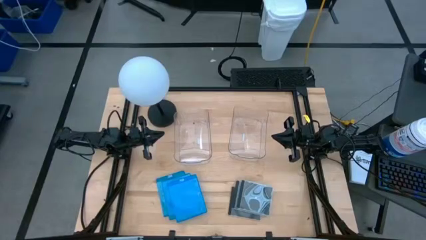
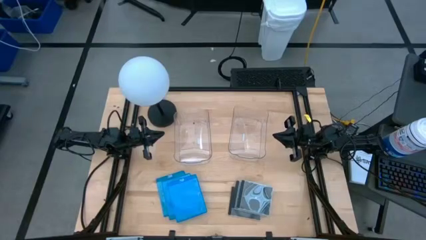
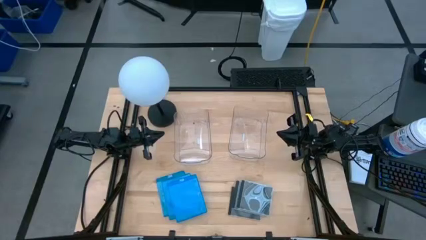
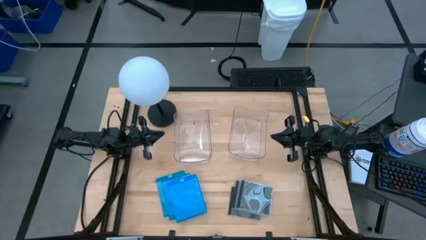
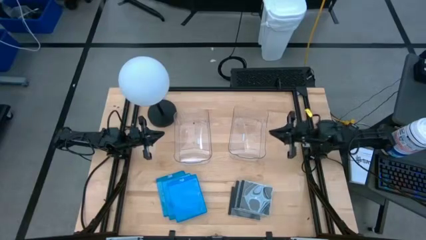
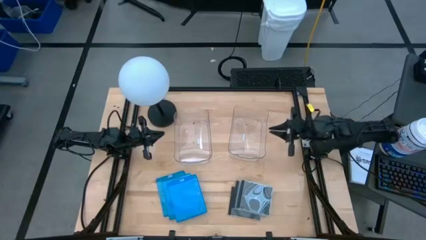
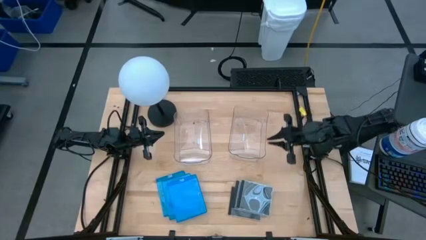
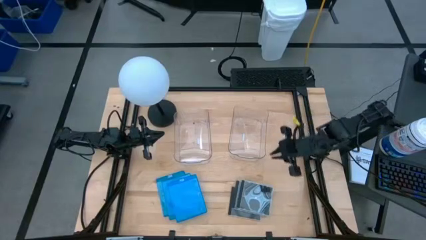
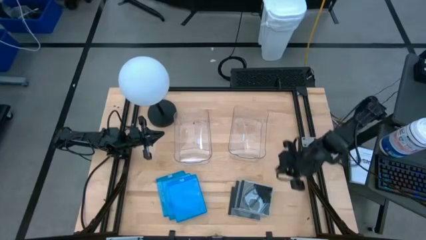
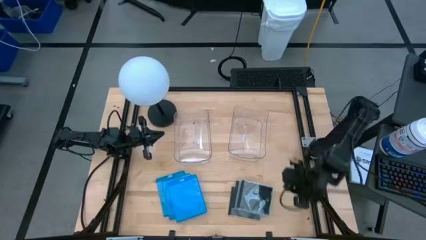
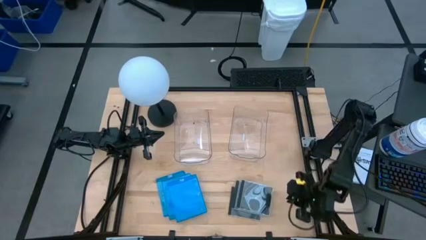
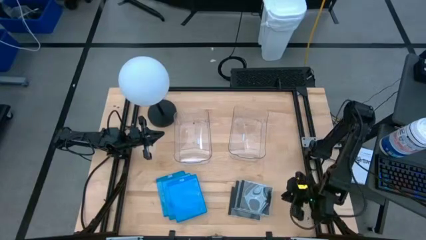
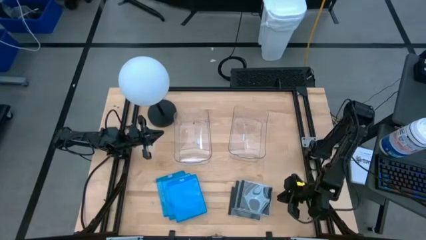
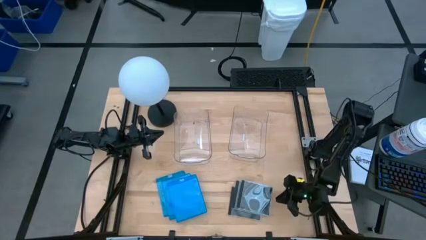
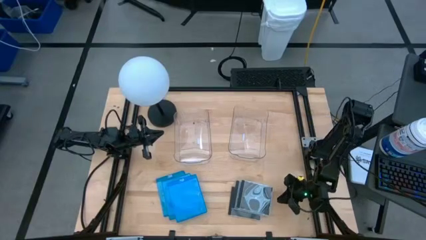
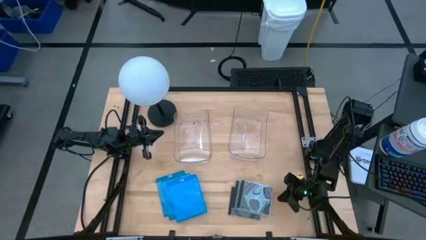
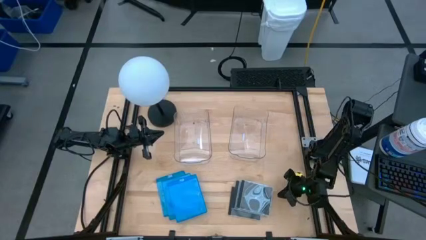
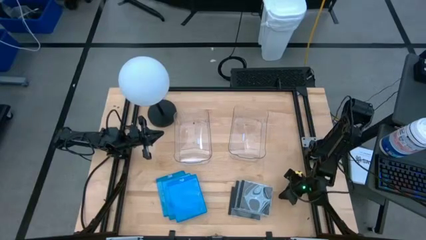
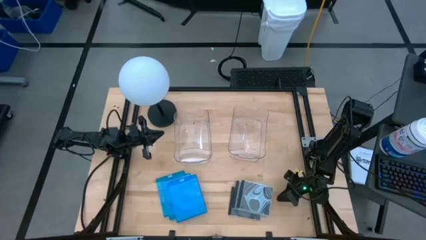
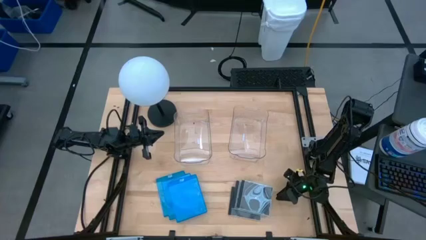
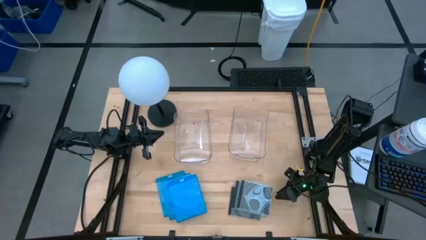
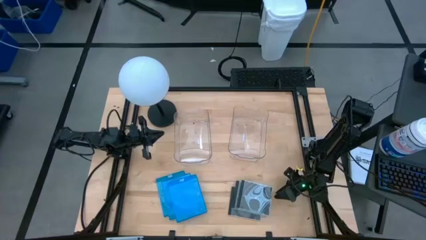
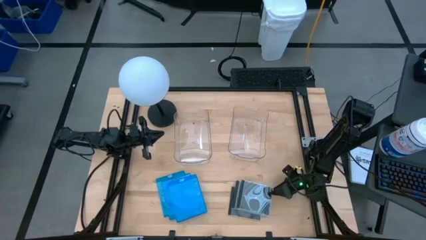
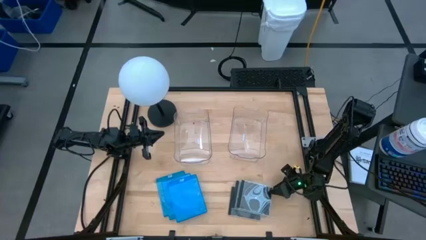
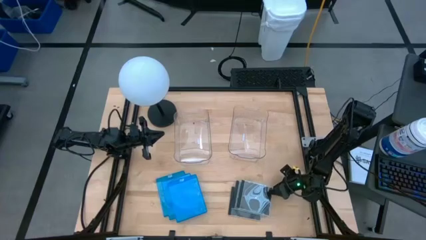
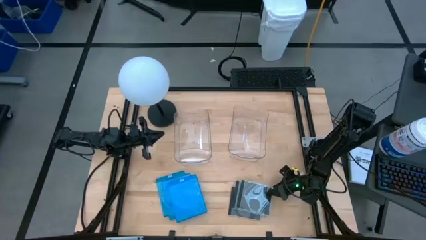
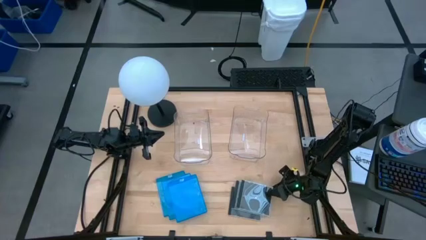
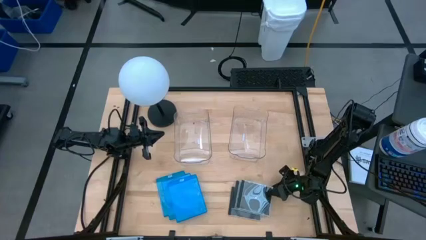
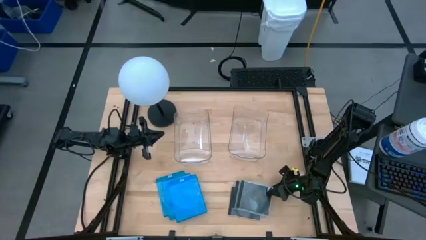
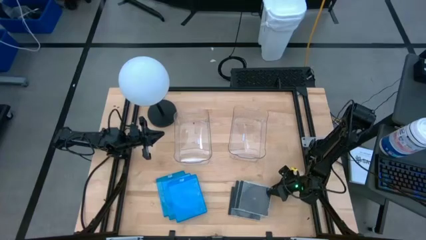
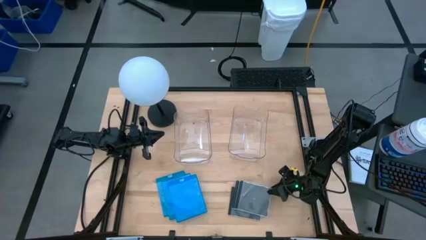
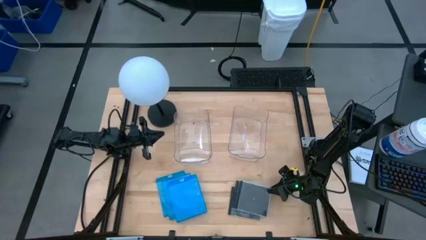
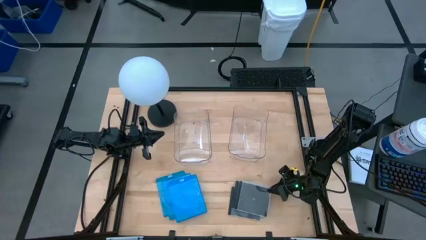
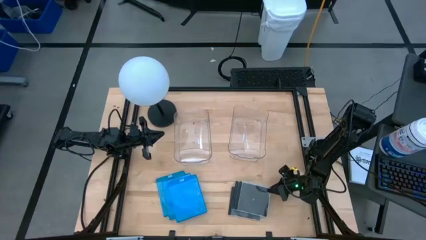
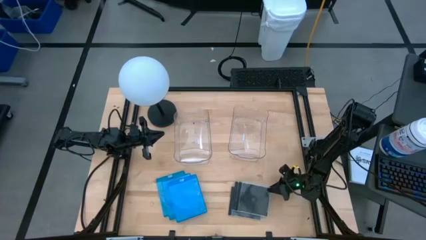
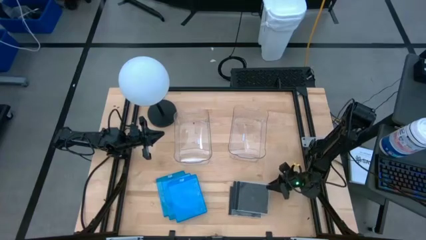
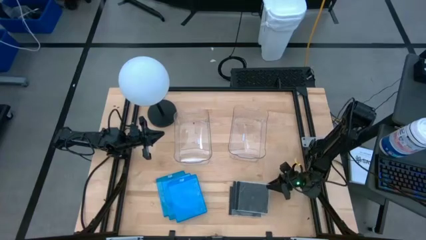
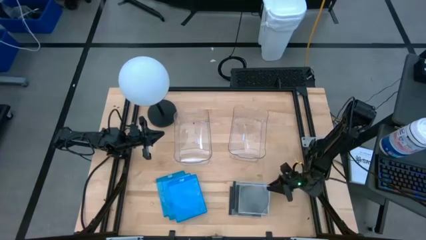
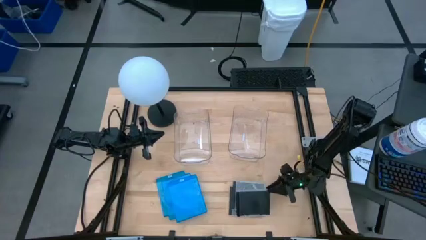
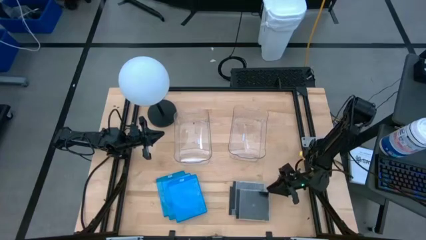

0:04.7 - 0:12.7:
Task: Pick & place jewel cases by type
Put the black CD case into the right transparent bin

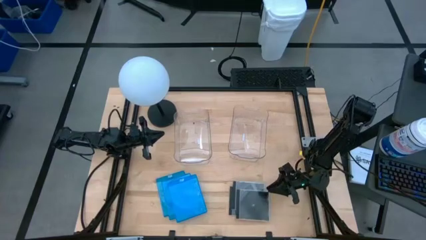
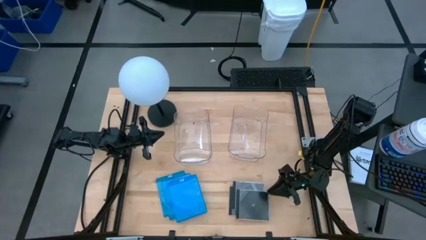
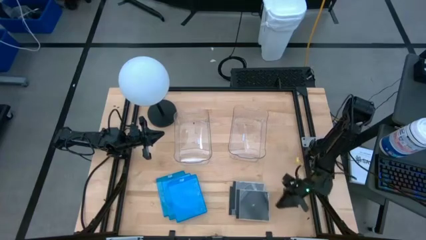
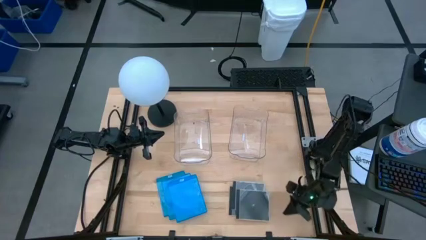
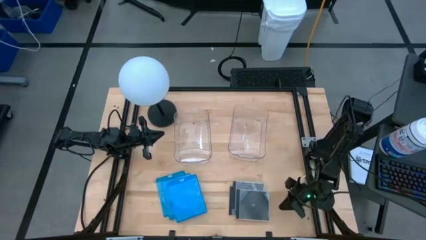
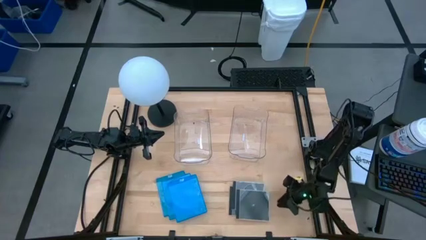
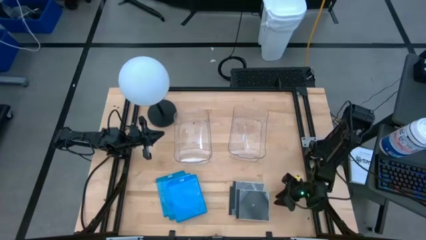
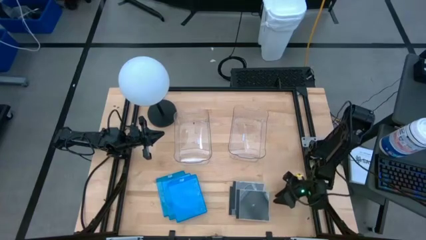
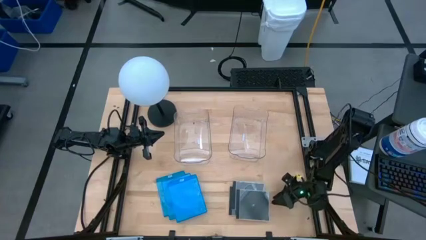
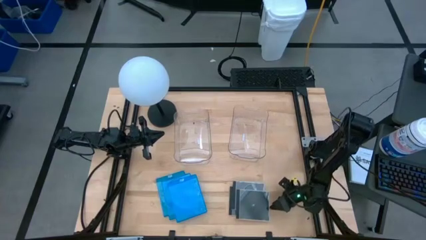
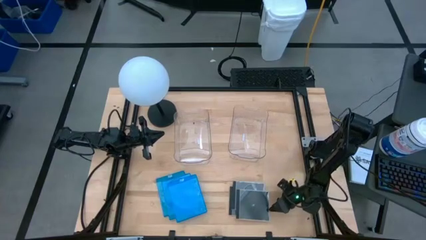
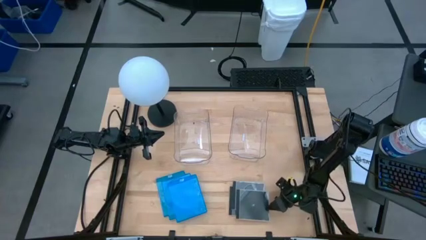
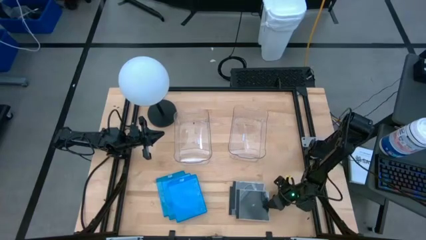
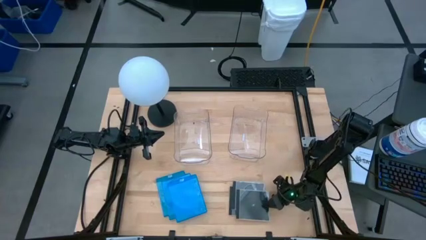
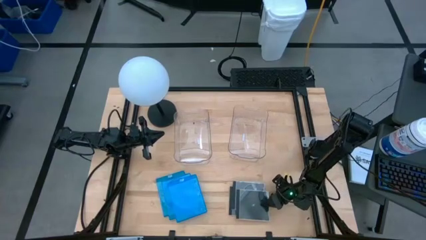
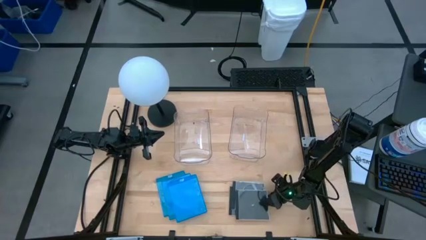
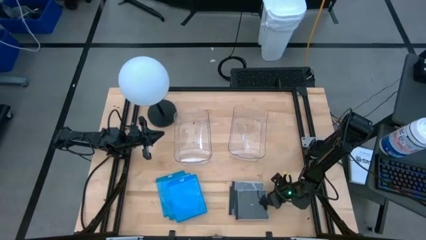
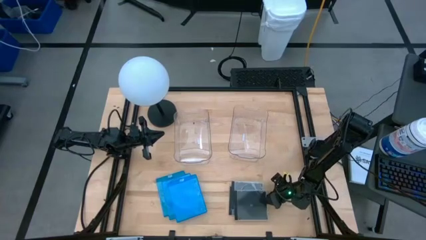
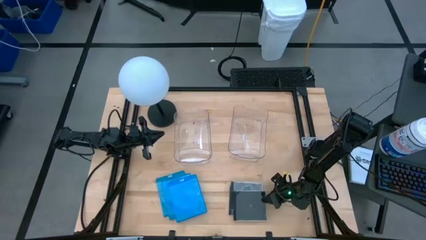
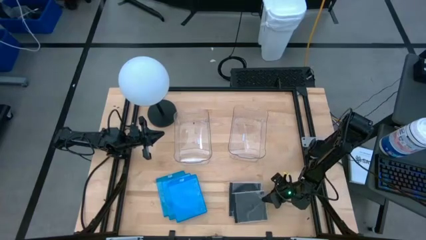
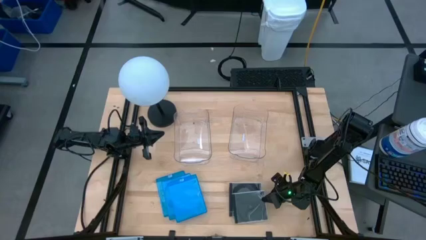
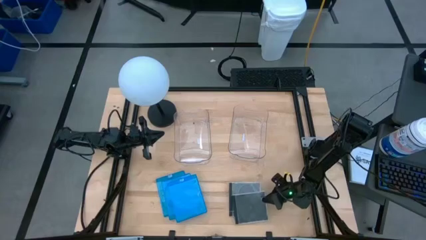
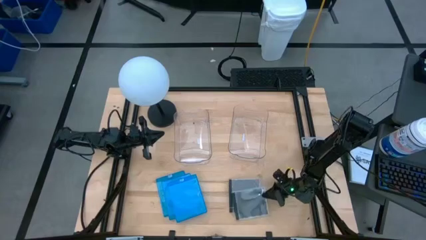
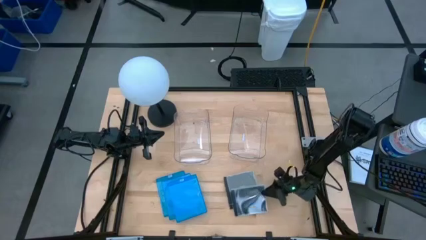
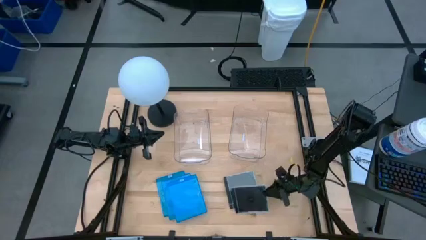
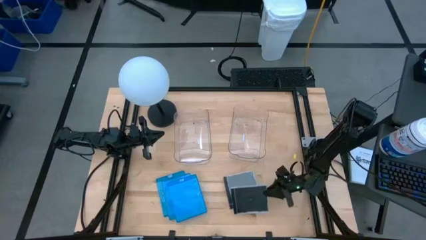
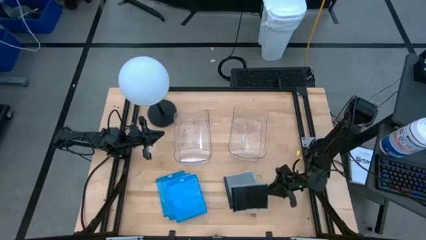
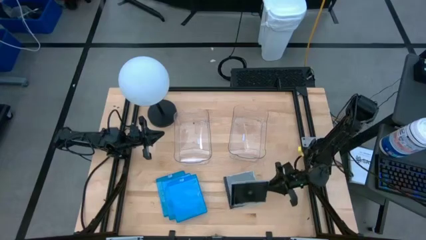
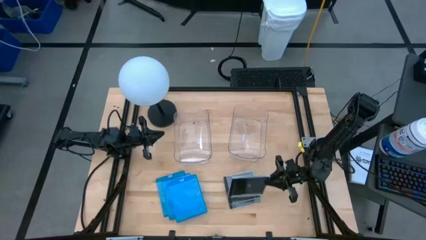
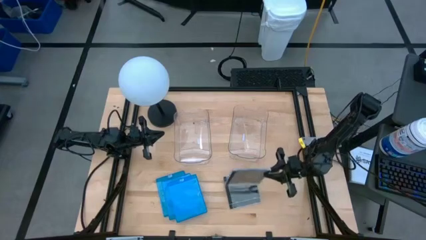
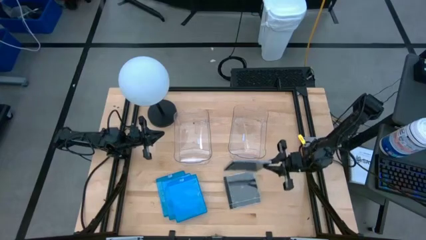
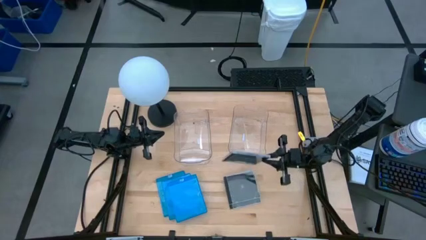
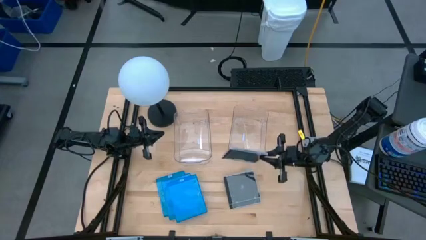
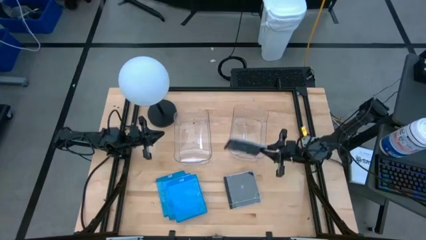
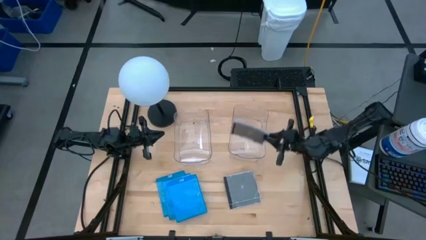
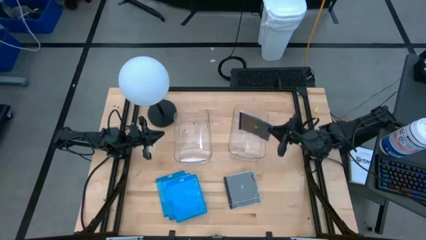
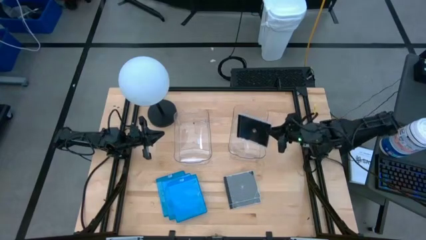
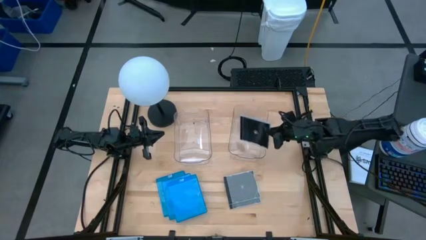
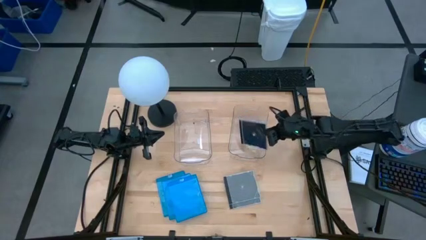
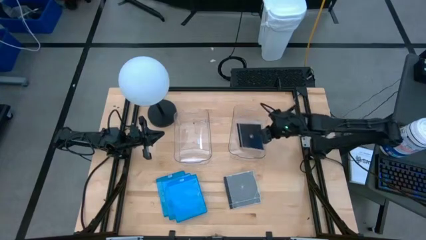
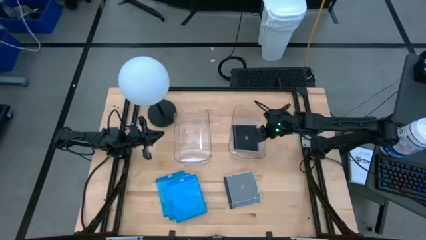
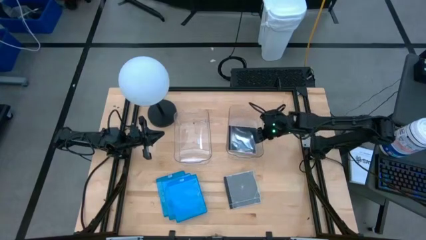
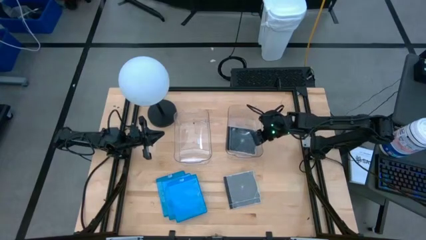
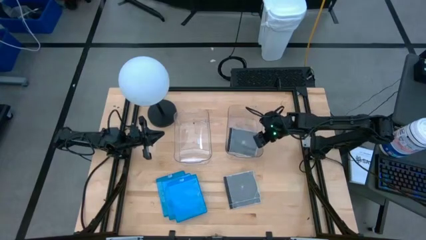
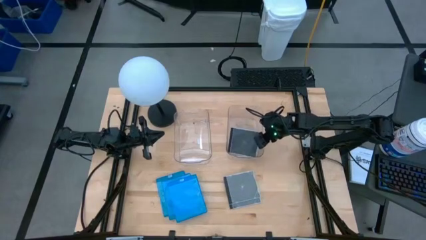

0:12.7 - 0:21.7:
Put the black CD case into the right transparent bin
